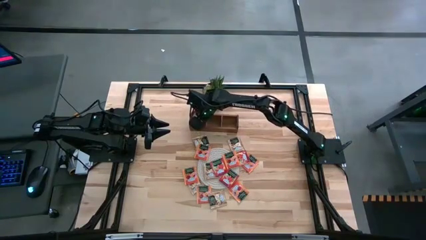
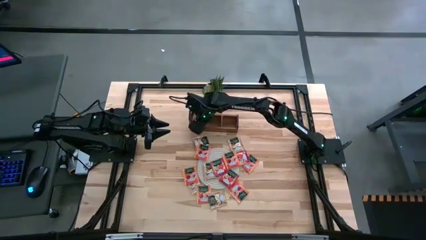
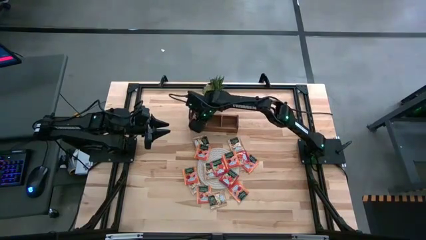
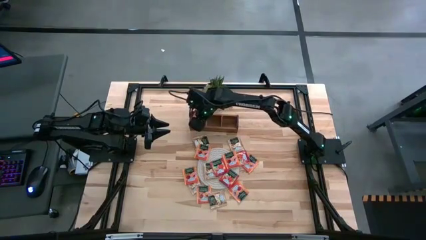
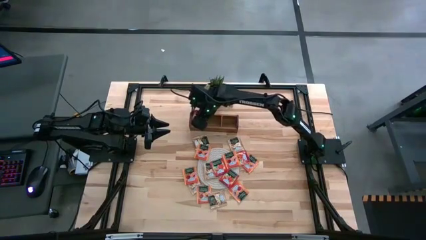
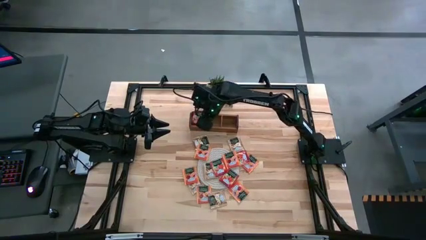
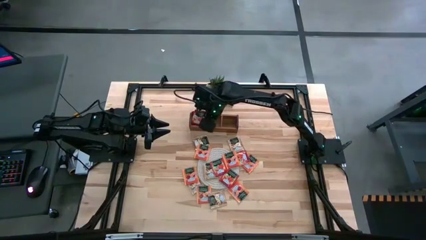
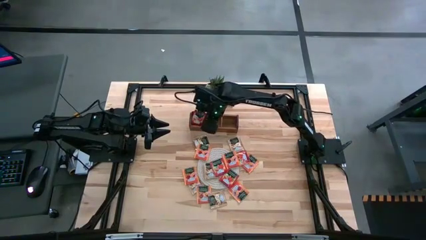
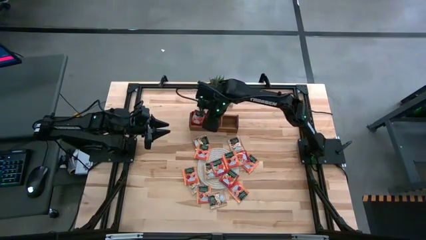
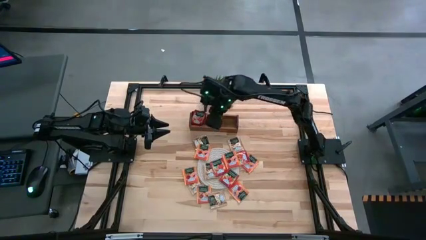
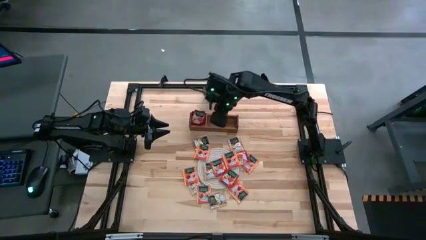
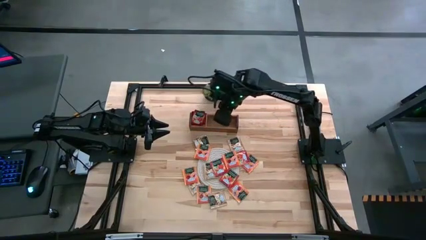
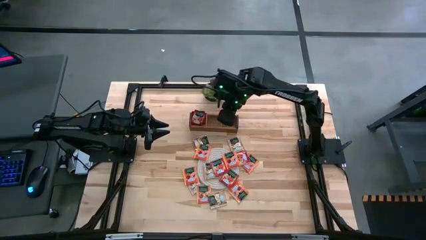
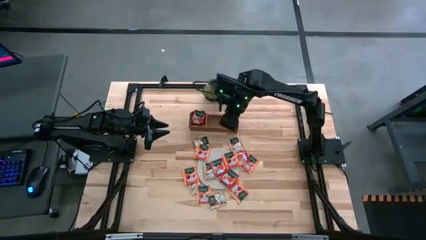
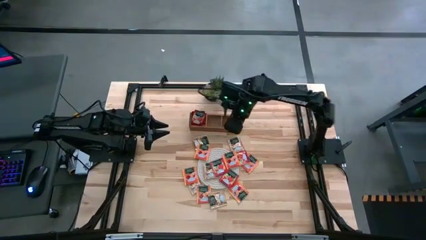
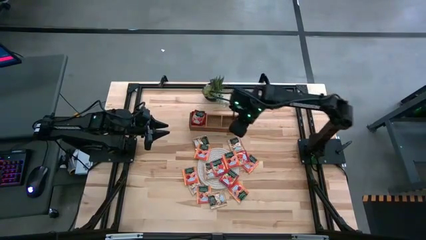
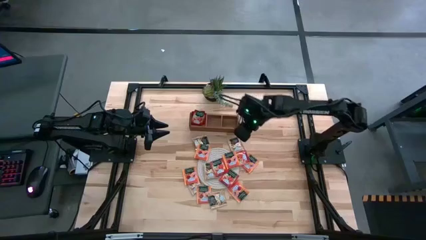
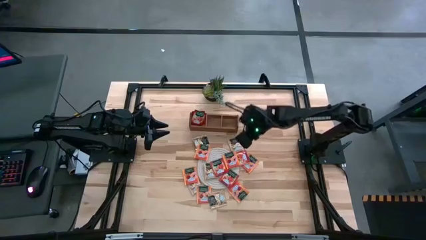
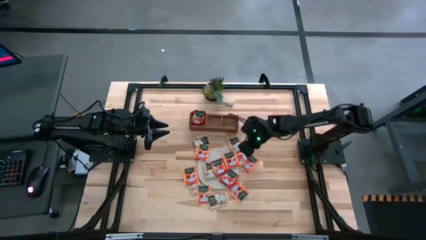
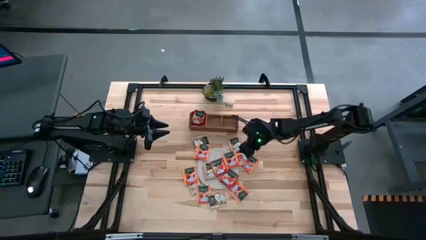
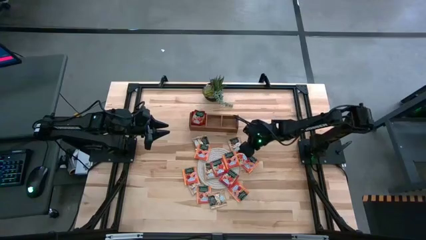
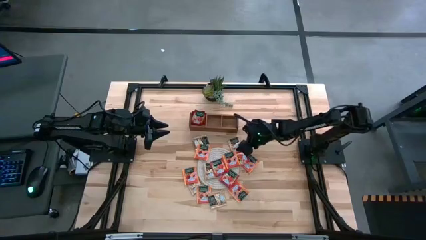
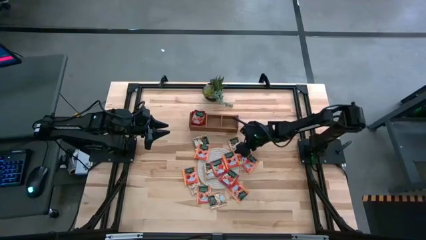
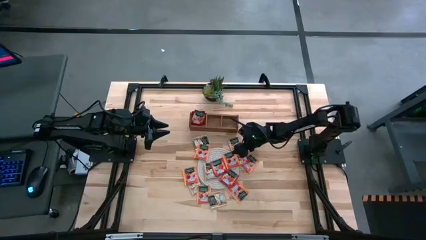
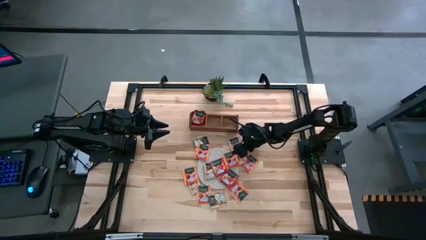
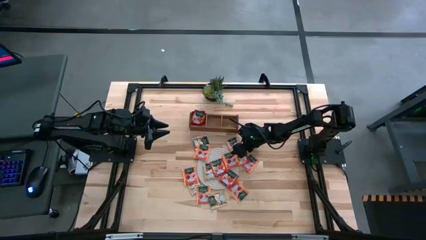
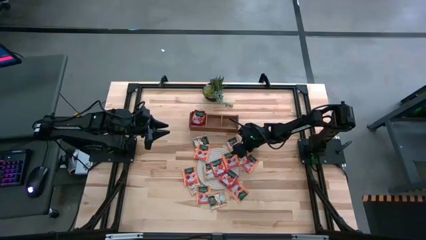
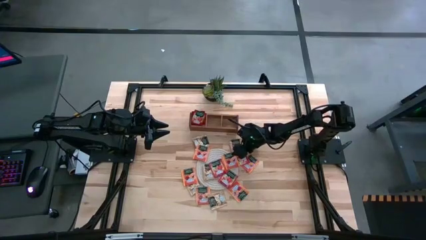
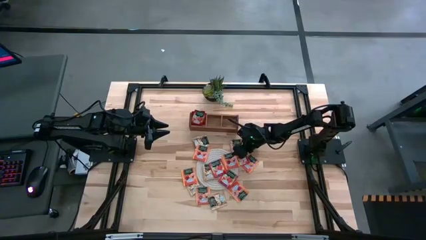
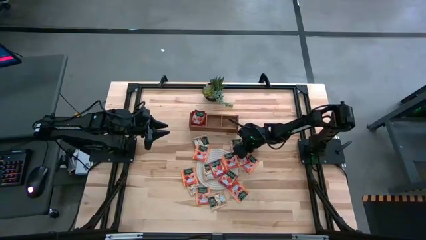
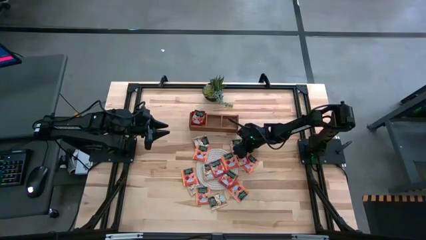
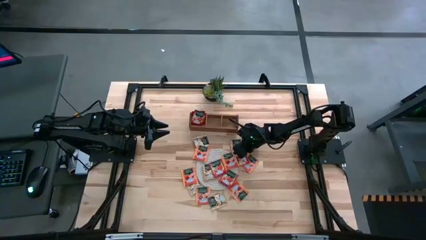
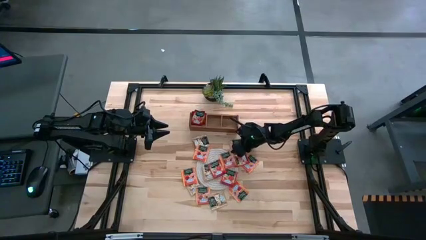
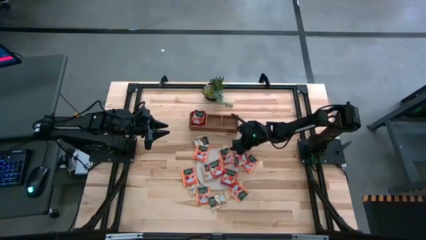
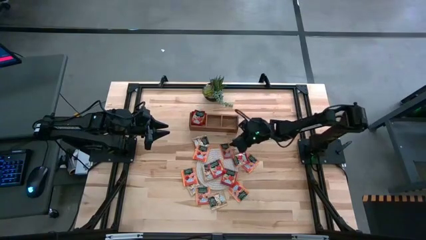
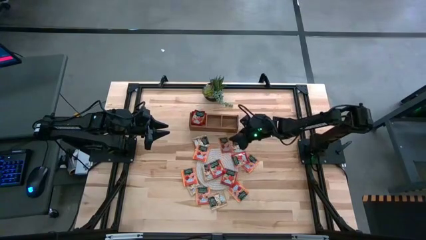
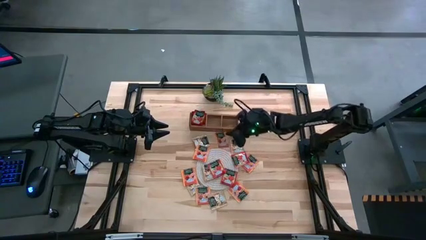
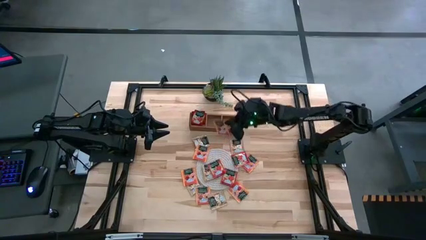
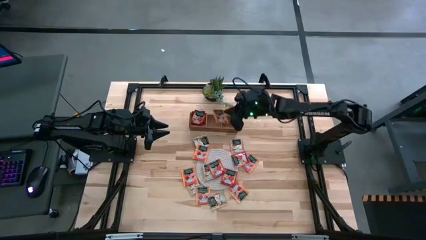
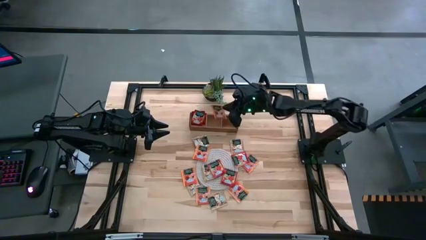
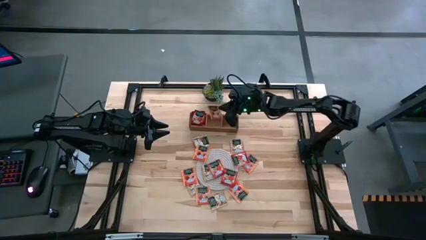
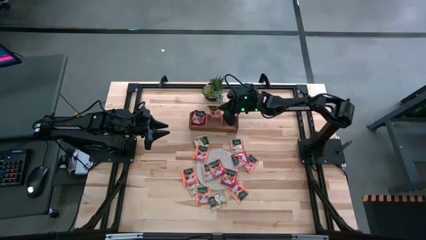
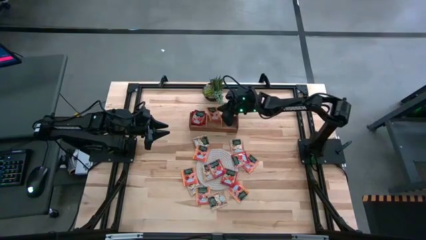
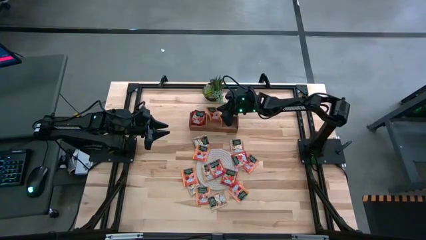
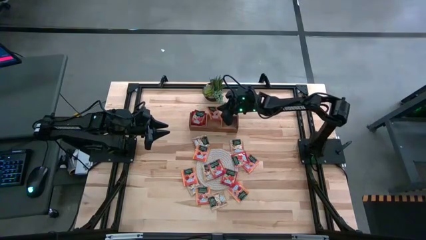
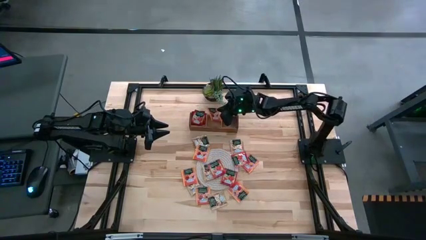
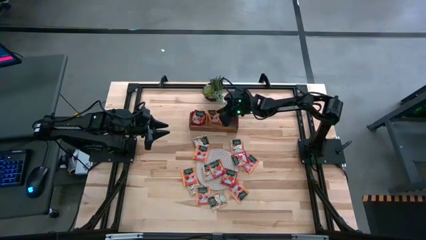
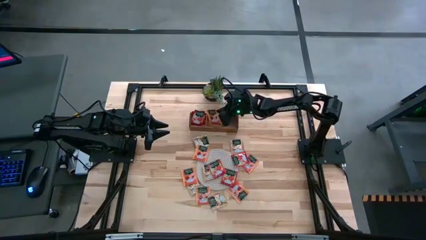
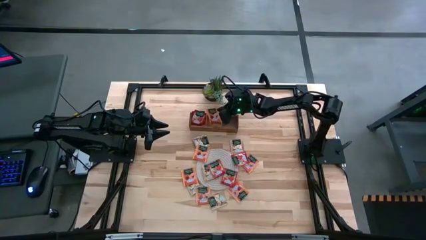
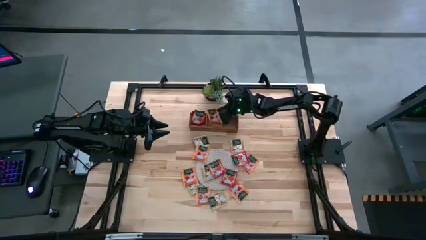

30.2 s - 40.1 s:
Task: Pick & Place Tea
Put the orange tea bag into the middle section of the wooden organizer
